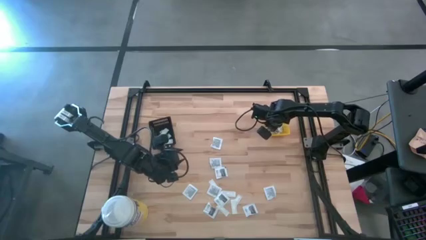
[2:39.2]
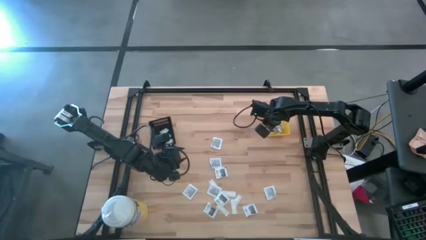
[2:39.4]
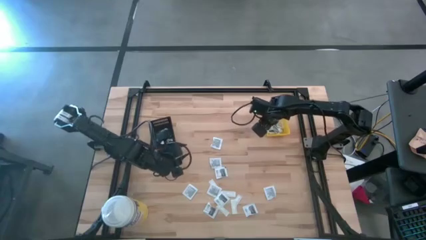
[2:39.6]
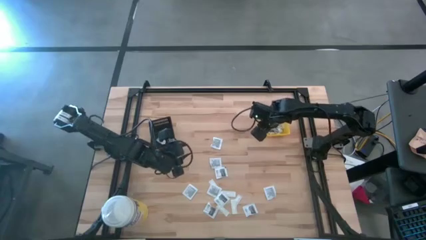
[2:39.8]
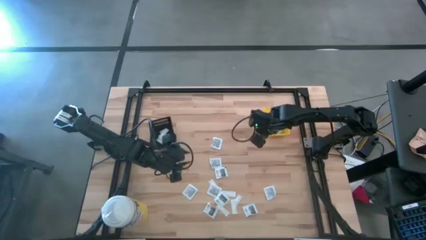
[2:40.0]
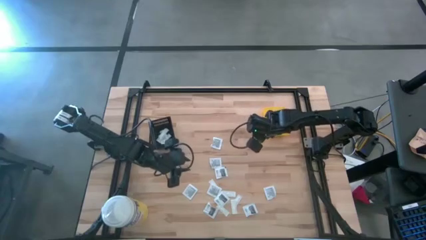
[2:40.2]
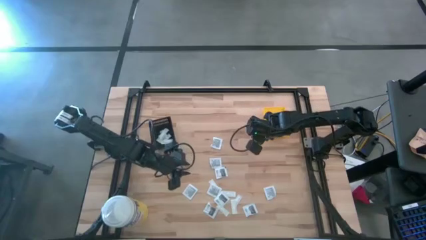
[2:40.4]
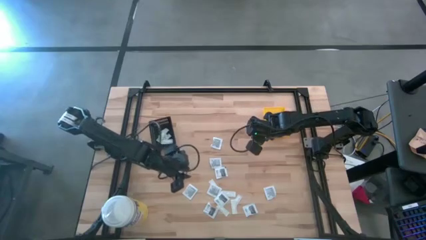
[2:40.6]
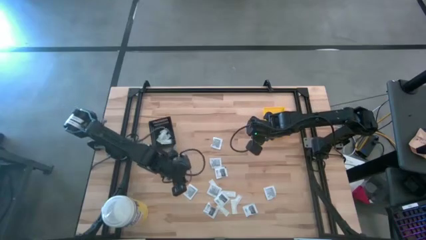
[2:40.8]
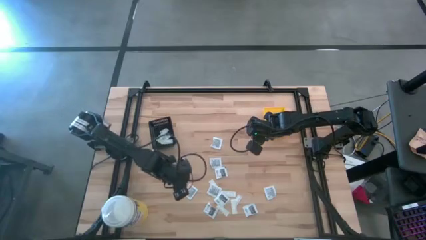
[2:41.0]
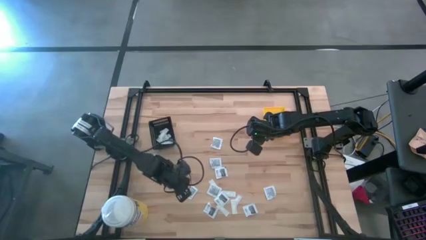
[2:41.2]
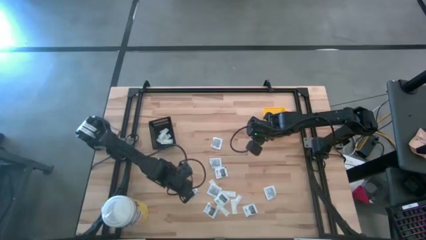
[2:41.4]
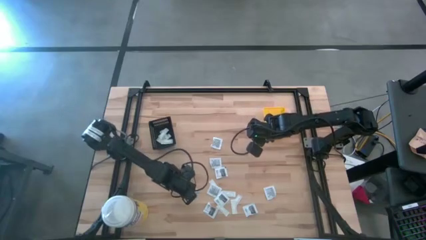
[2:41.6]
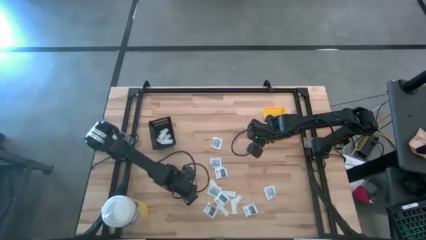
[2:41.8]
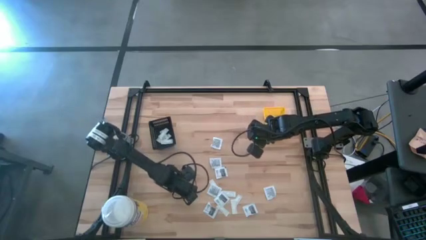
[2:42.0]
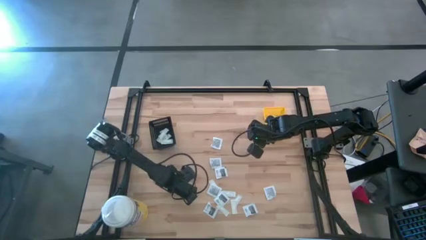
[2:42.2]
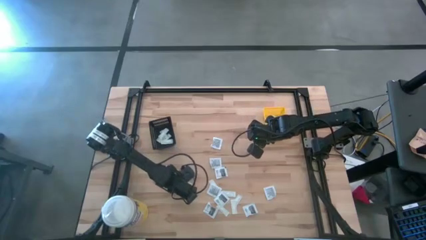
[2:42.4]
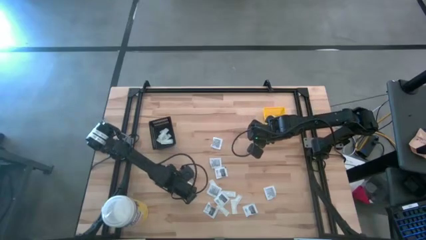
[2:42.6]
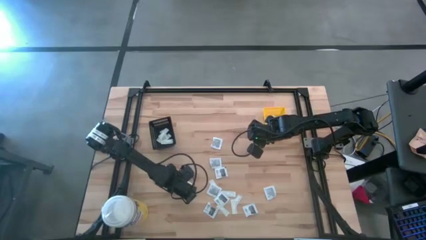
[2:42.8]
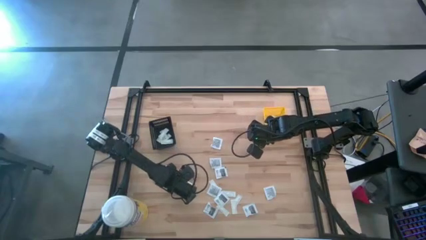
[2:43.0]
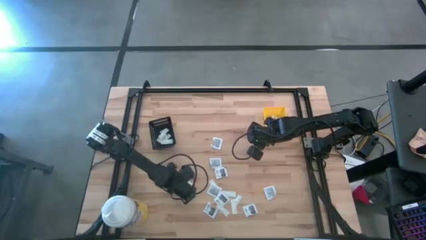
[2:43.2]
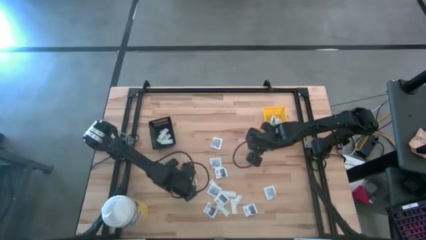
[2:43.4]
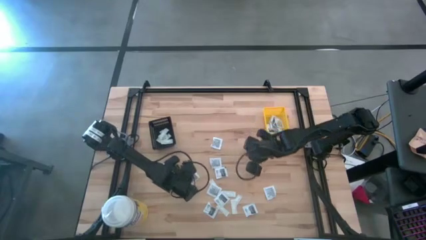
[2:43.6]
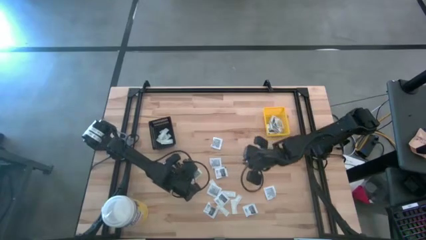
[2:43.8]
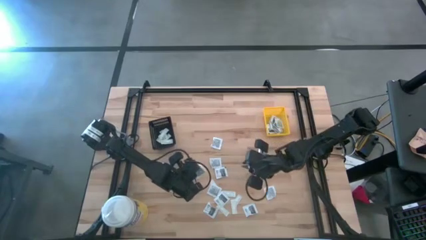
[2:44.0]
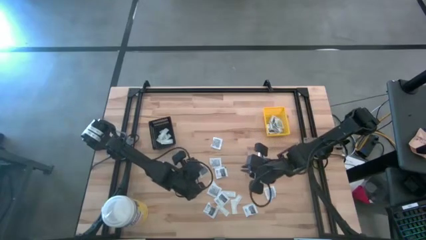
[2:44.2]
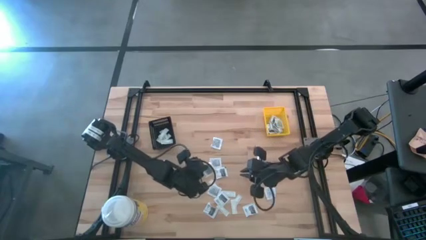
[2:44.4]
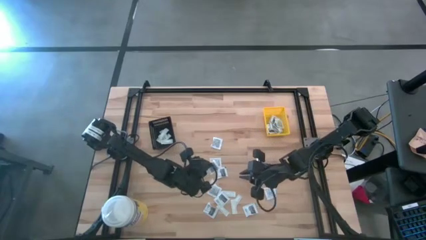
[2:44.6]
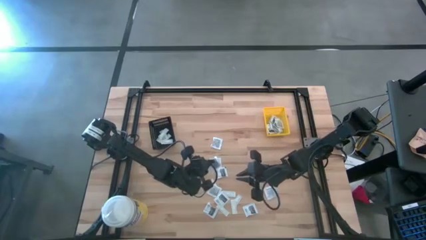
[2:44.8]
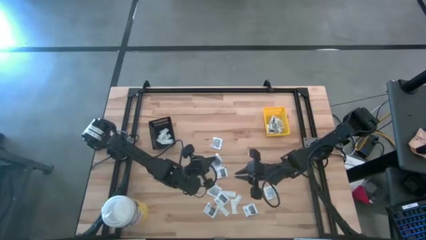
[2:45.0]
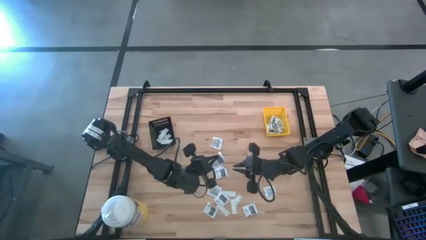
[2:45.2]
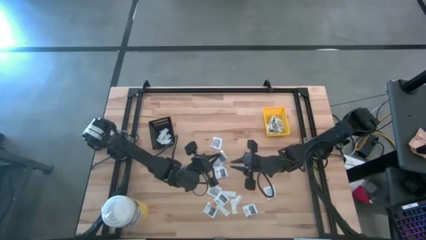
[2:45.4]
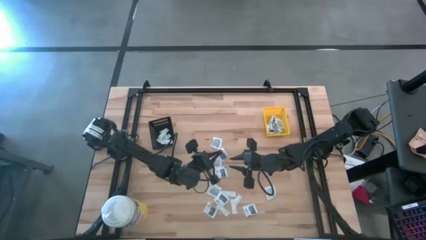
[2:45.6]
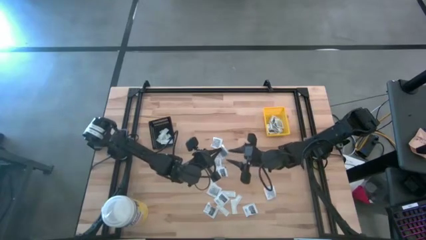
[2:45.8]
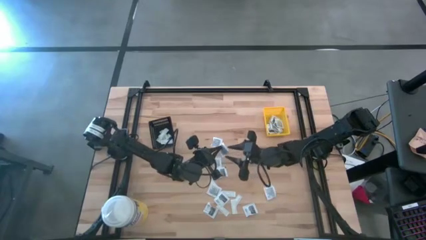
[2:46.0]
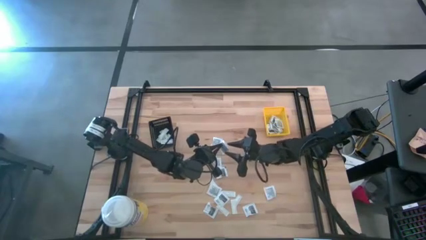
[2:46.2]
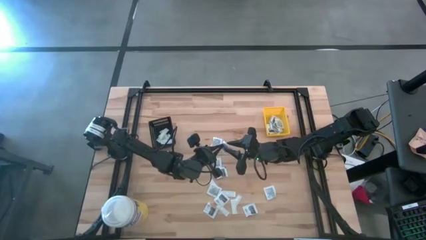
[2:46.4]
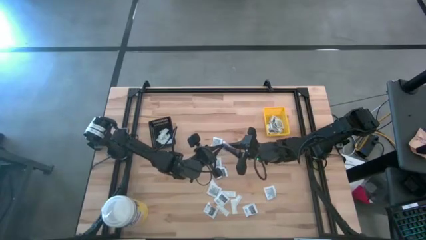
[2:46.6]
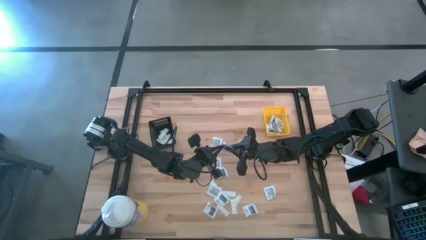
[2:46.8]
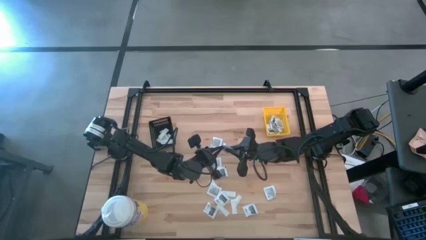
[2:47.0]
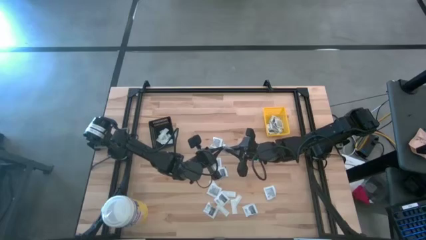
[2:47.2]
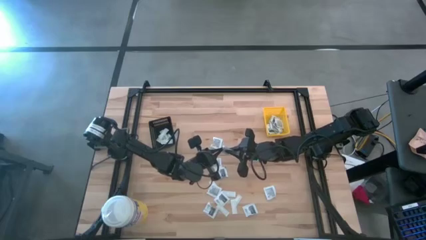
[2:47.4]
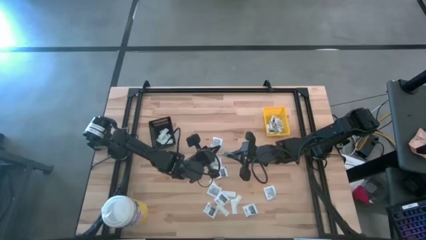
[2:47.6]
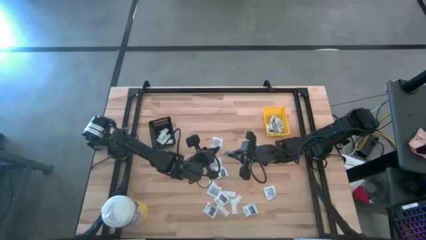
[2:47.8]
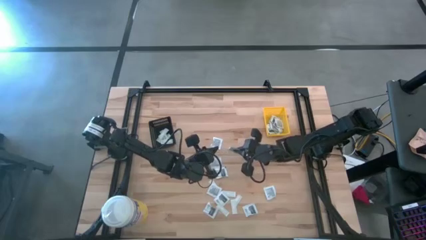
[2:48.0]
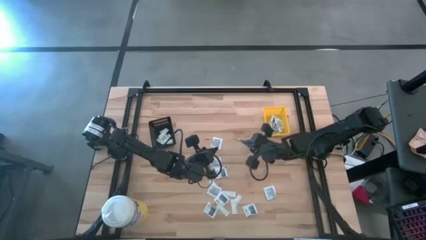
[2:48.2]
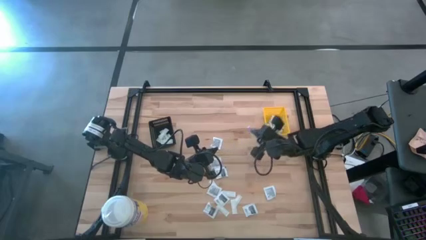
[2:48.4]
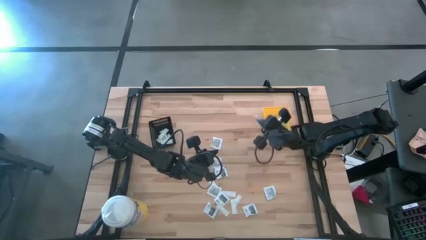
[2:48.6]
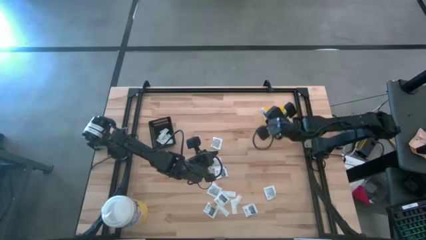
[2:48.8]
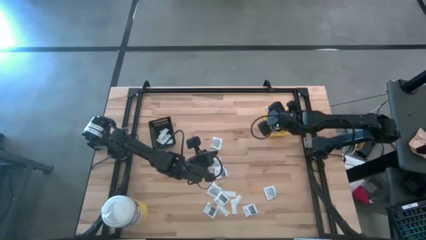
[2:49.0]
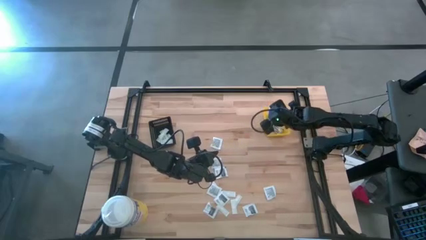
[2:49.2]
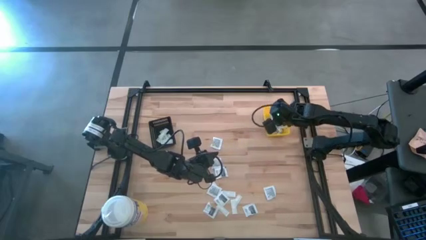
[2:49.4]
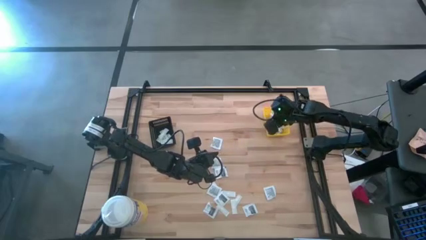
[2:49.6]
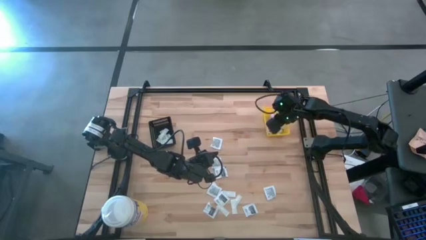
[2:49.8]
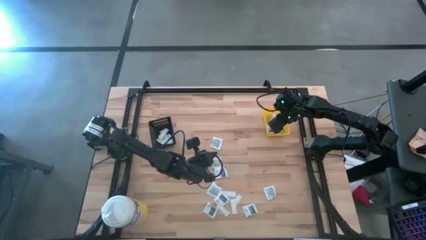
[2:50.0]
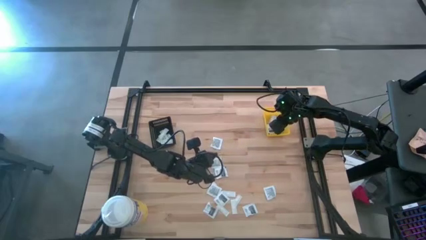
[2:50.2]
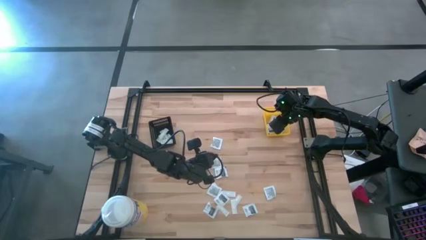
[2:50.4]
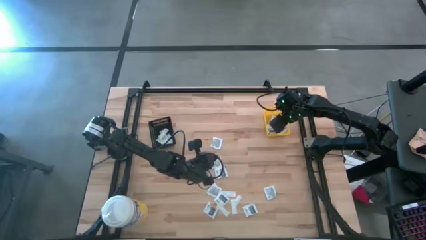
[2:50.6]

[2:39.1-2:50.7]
Task: Pick & Place First Aid Supplies
Put the black pad into the yellow bin

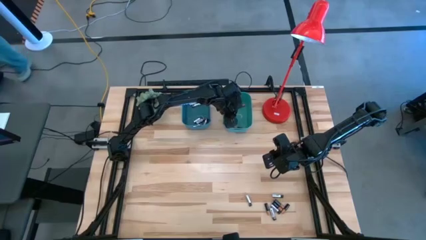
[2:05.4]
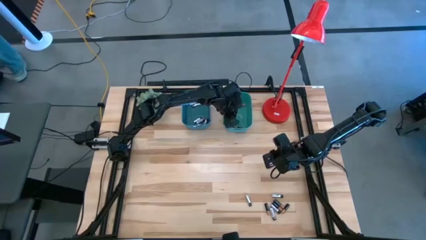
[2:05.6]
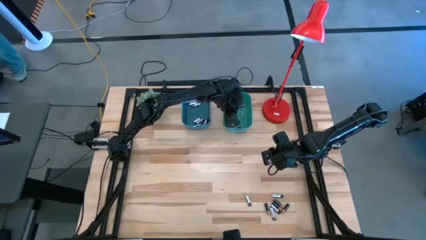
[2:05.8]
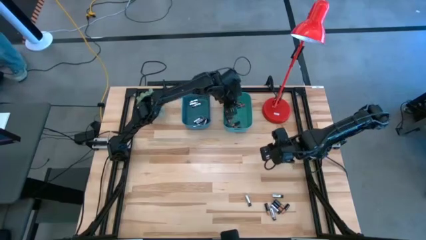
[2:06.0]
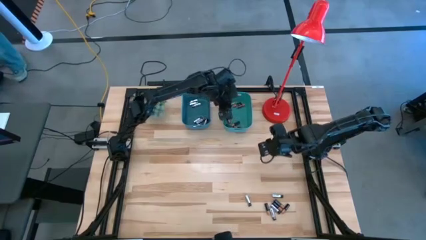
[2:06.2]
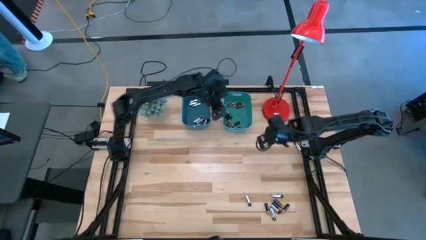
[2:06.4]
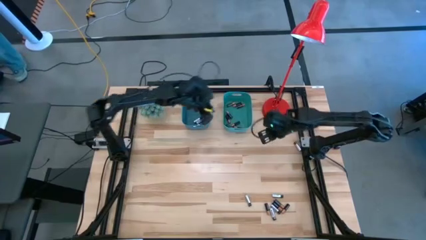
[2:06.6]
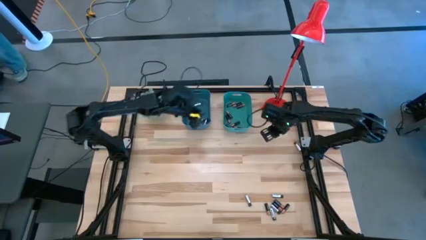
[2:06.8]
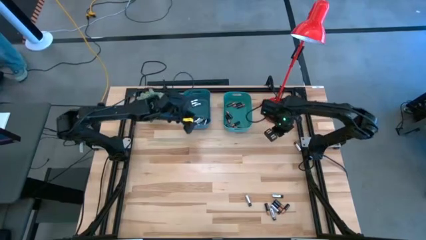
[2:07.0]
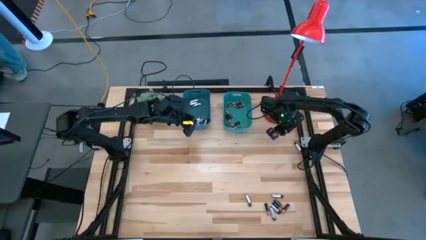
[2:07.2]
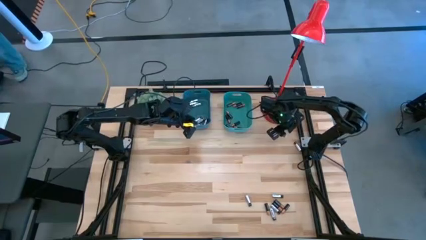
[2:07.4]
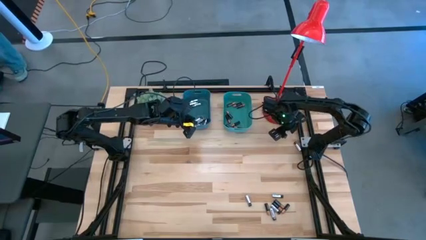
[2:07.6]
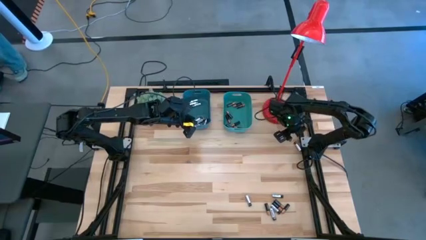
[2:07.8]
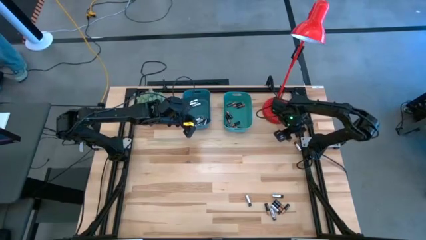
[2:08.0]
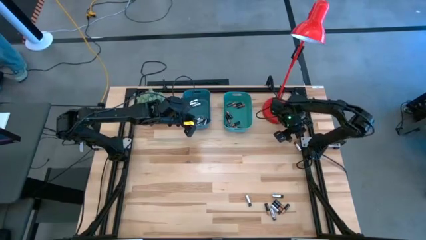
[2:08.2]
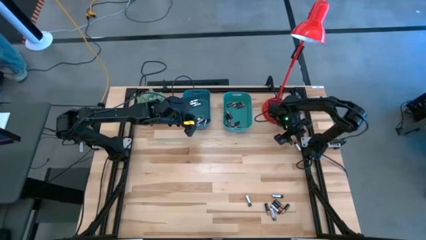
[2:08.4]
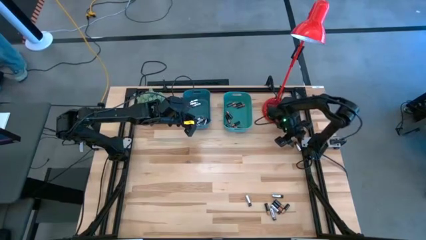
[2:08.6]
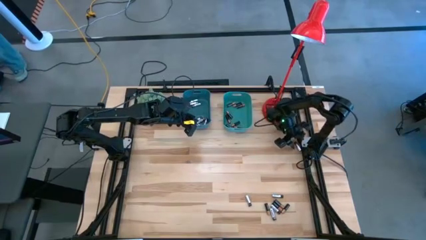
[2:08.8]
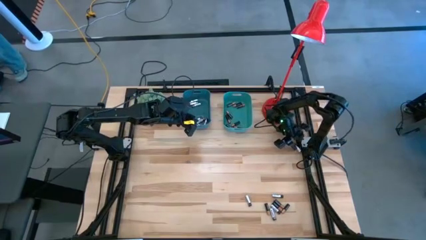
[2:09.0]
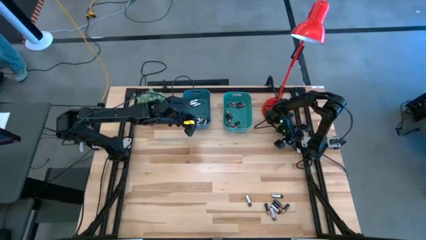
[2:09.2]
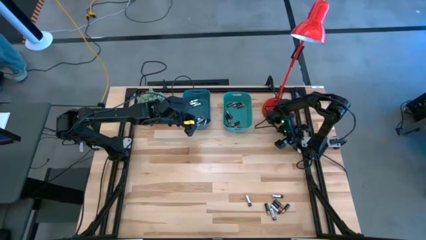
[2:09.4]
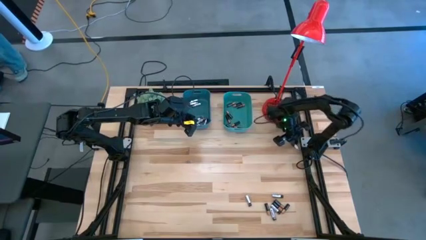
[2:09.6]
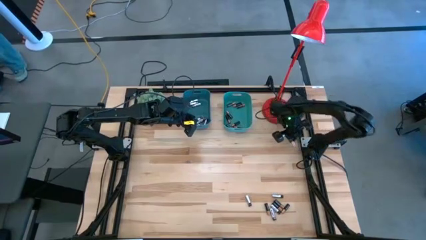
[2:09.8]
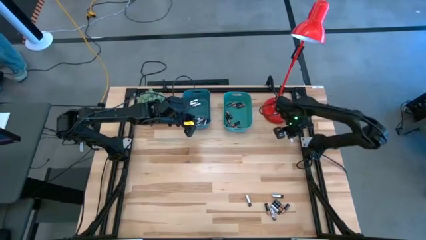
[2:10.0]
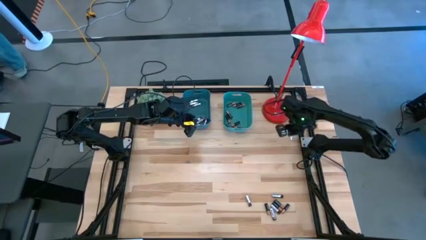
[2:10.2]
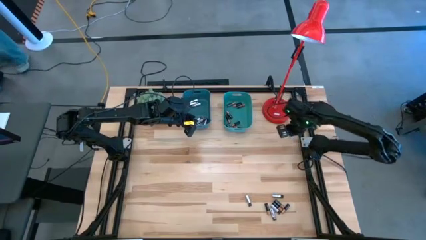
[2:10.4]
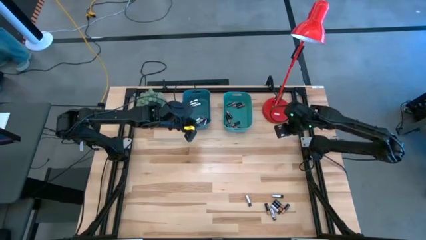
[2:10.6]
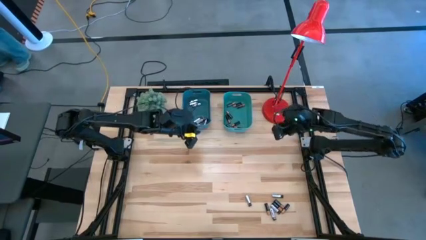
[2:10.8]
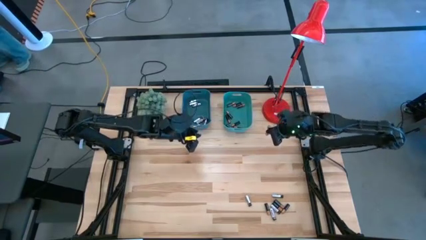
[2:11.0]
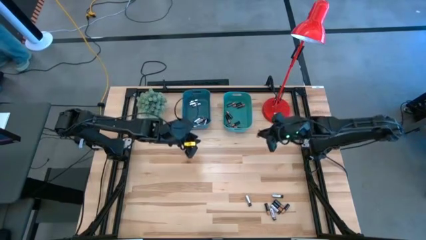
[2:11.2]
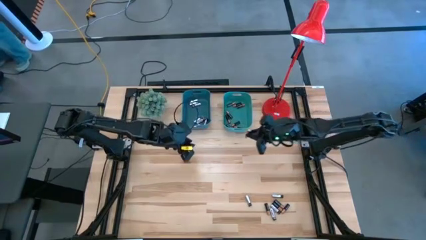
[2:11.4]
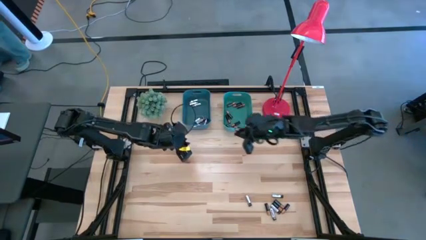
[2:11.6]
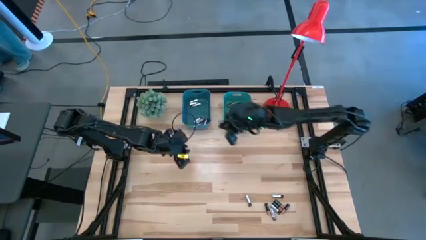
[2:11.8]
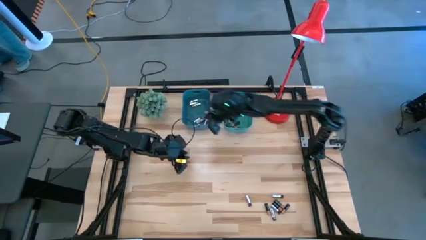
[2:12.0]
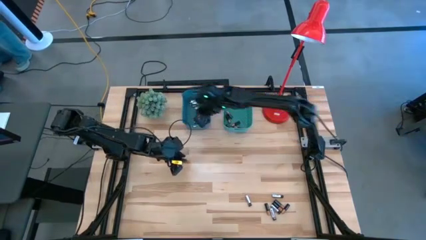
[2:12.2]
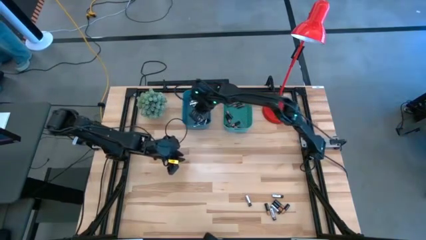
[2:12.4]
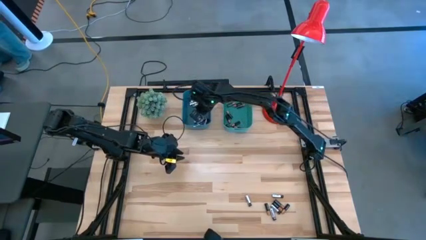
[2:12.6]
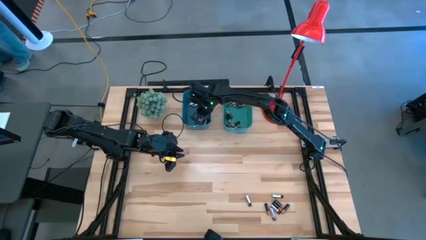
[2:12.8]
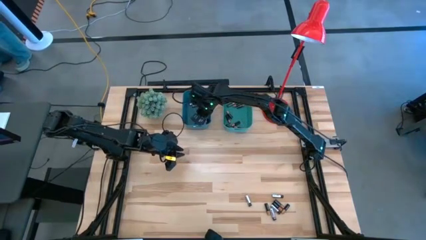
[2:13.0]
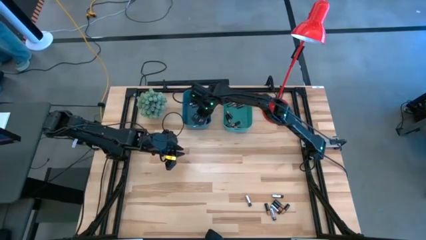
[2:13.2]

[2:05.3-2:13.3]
Task: Sort batteries
Put the silver battery into the blue bin
